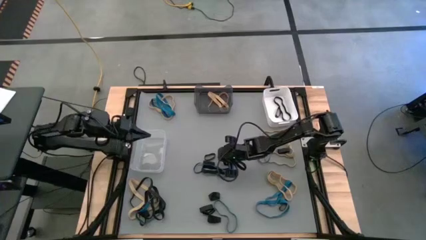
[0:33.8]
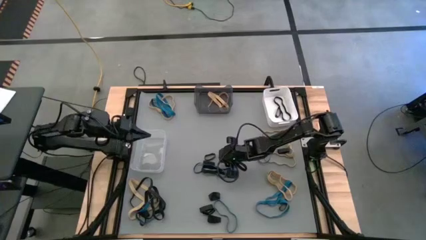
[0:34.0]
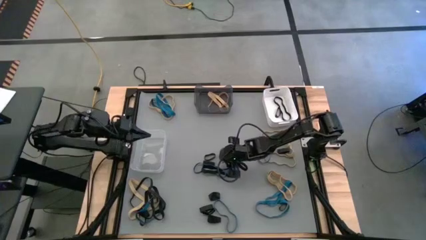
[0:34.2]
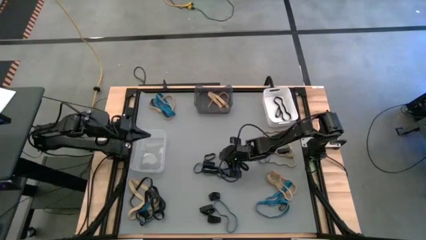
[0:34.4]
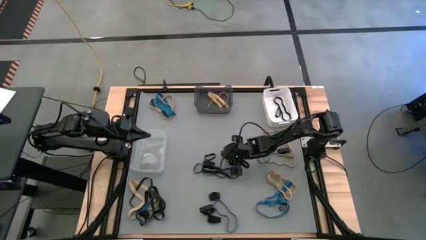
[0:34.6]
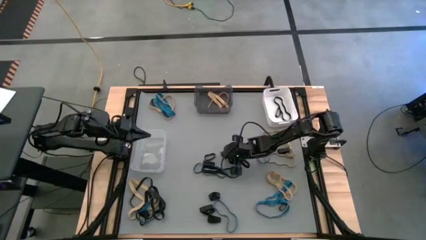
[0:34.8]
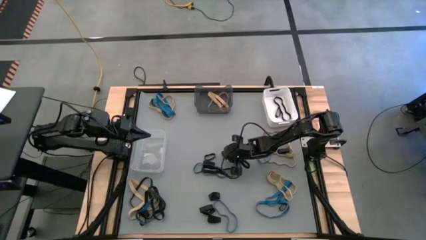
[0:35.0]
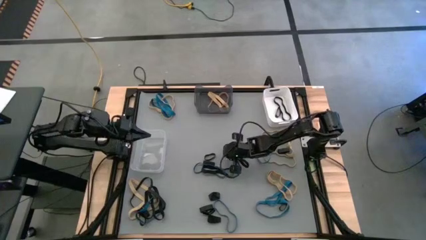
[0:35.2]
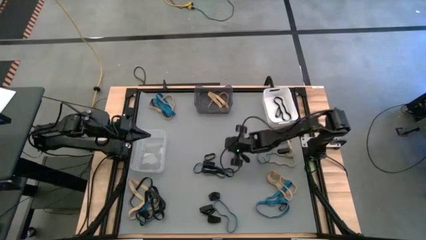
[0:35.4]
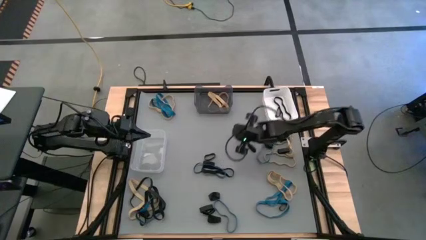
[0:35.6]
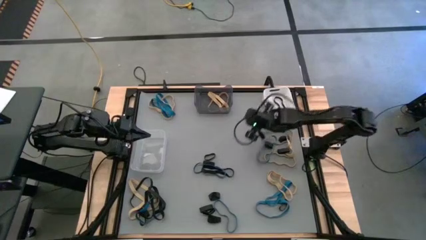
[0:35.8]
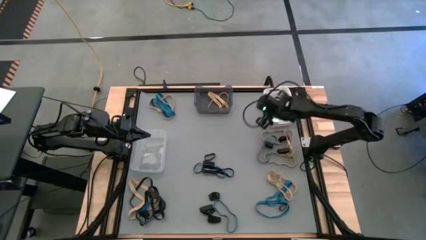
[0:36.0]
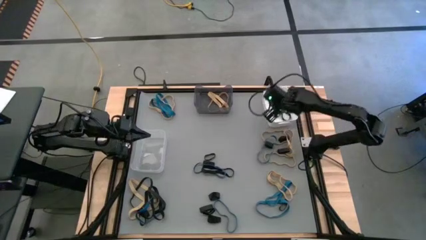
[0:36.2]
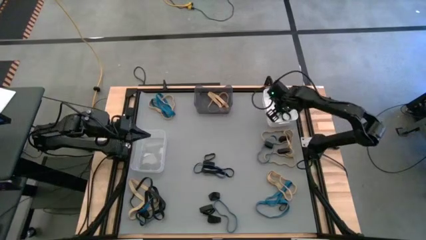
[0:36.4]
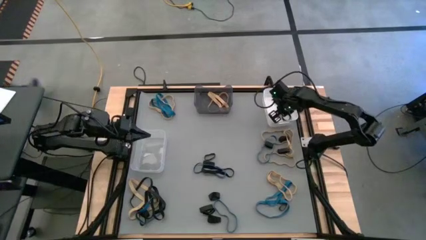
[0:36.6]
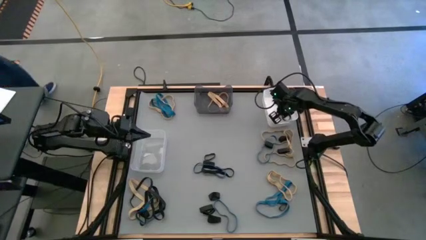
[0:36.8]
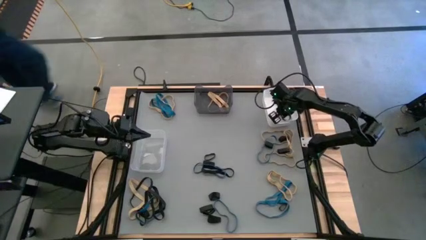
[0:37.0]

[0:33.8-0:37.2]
Task: Sort rubber bands into baskets
Put the black rubber band into the white bin

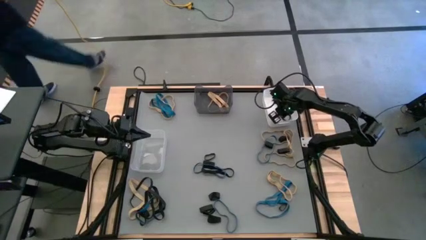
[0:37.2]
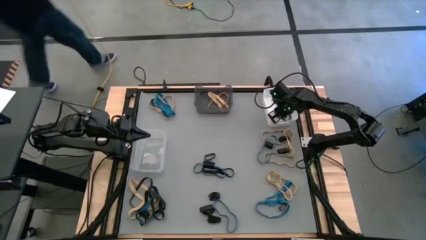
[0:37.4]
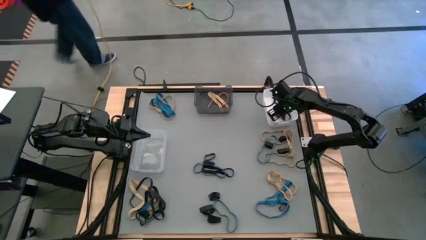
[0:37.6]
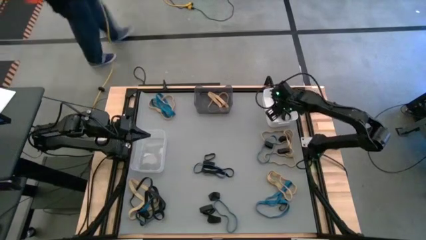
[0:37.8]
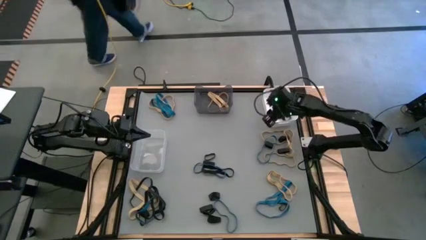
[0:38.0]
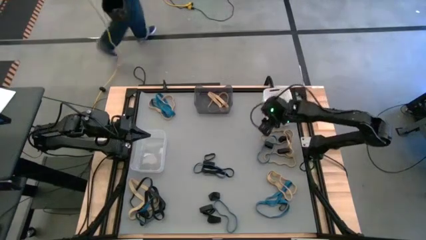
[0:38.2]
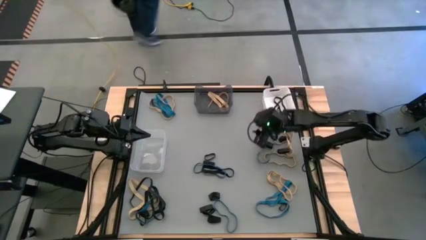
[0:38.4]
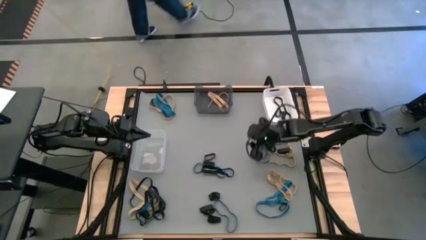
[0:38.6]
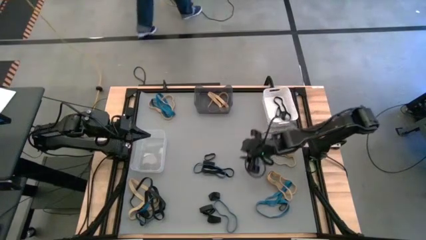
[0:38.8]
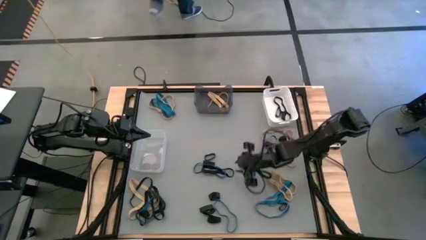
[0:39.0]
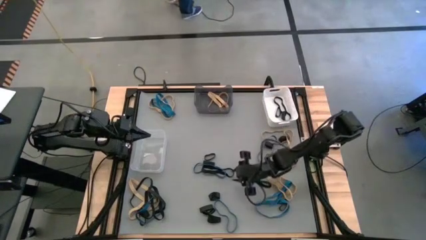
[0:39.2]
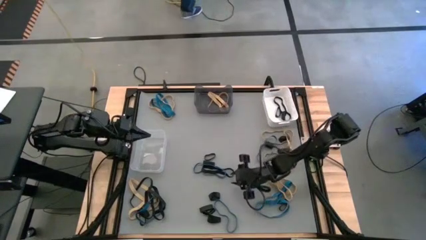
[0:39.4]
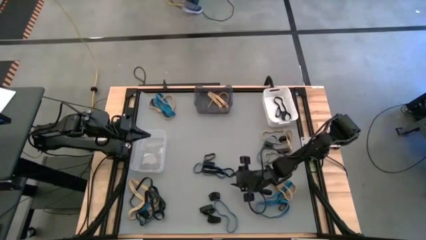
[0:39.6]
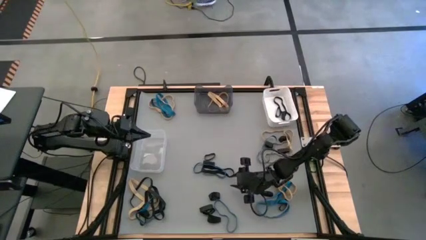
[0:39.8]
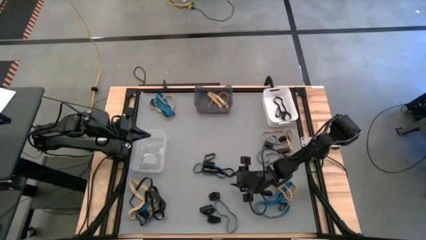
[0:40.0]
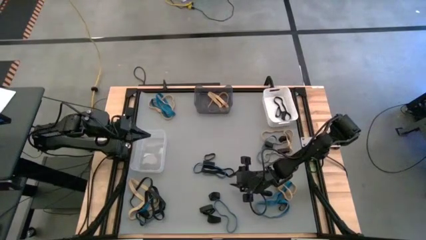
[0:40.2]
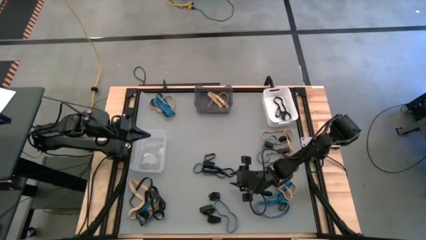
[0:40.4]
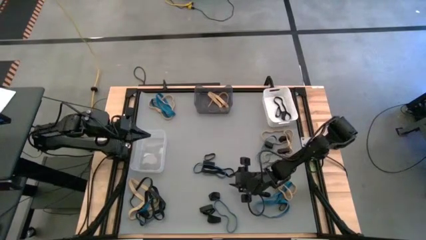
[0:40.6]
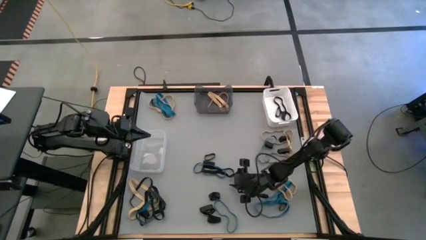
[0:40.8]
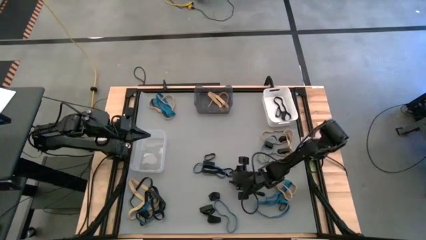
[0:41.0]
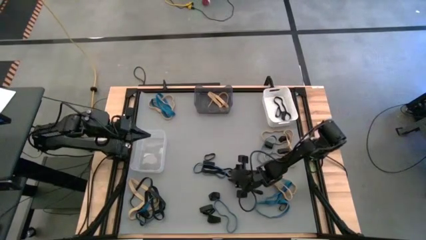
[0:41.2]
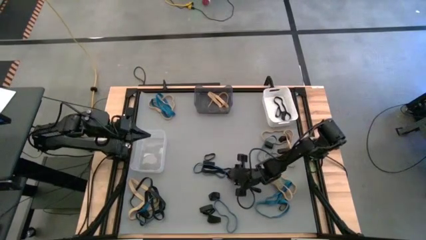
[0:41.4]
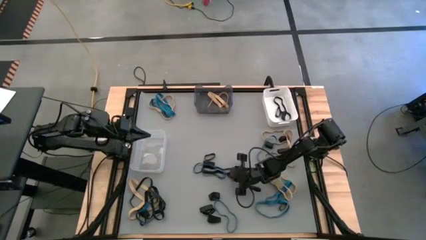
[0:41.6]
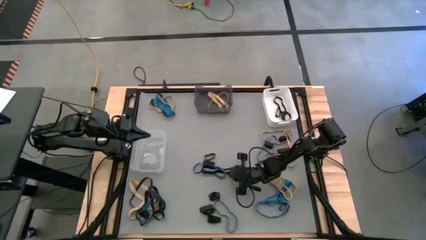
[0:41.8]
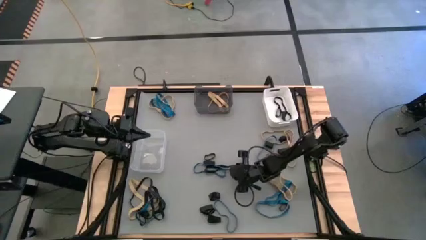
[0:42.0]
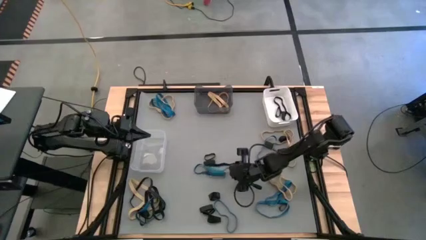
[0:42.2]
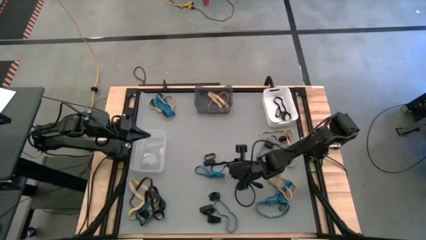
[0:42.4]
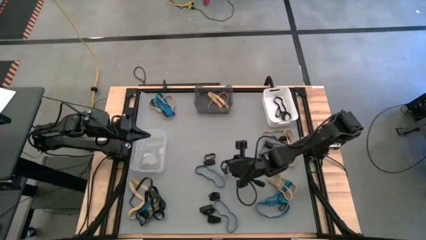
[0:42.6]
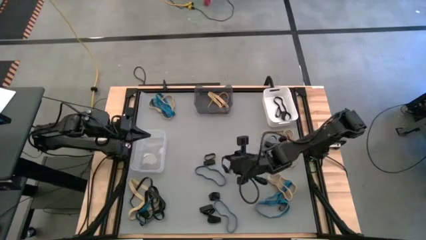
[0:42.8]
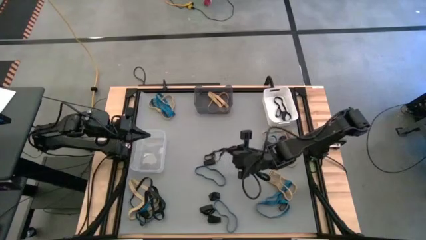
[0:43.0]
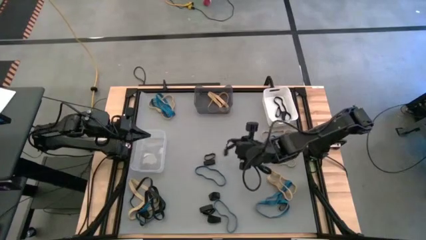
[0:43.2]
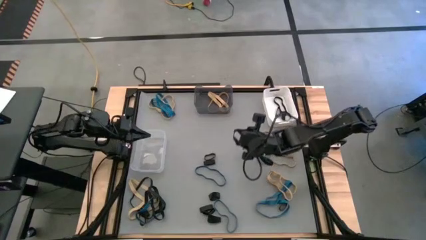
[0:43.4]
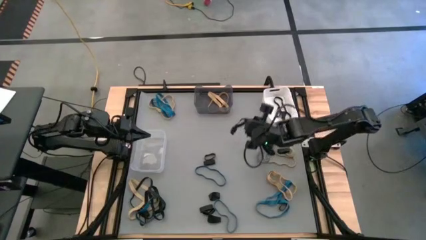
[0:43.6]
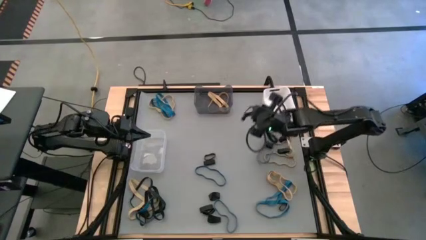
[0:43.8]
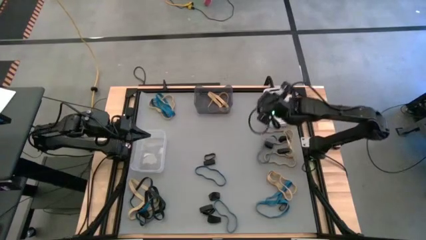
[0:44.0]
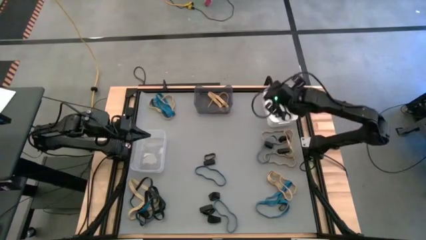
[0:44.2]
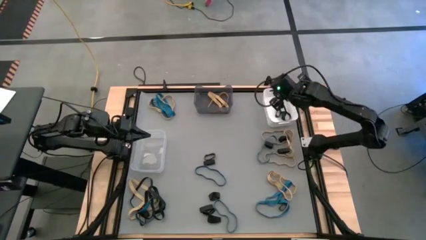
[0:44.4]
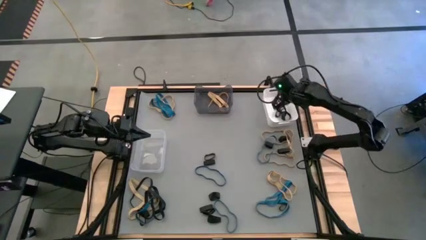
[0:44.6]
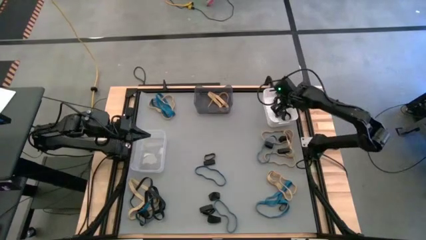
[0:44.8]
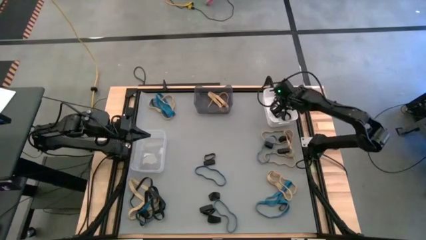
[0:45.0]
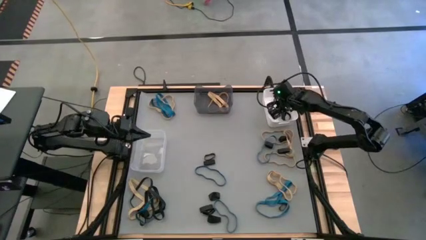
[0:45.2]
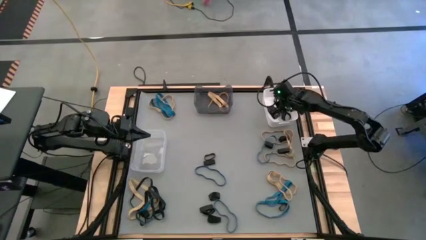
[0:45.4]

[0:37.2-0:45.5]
Put the black rubber band into the white bin

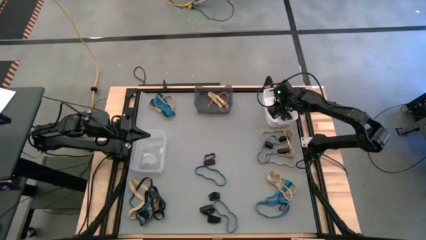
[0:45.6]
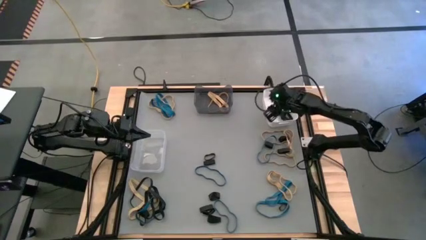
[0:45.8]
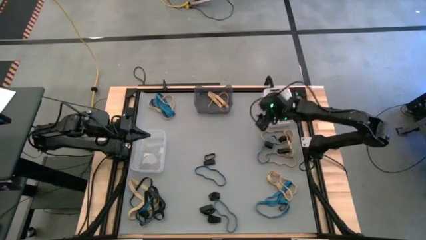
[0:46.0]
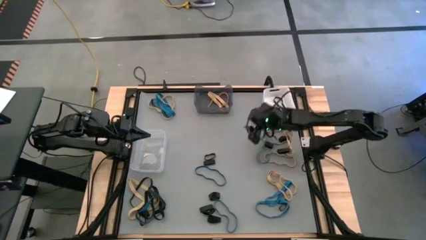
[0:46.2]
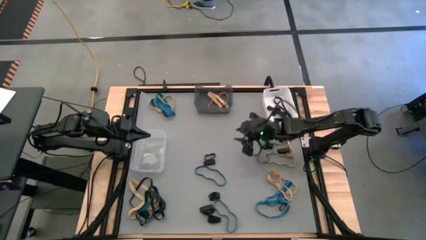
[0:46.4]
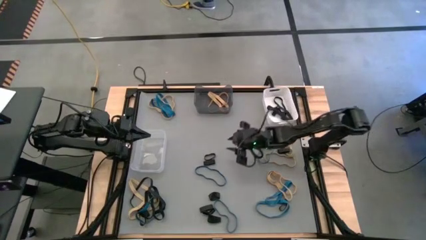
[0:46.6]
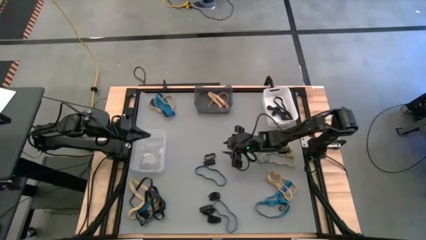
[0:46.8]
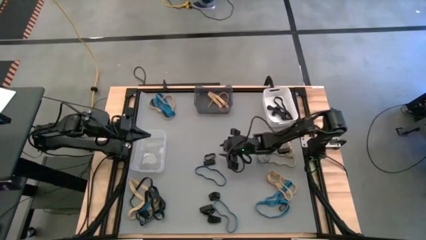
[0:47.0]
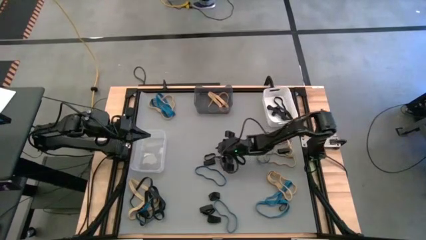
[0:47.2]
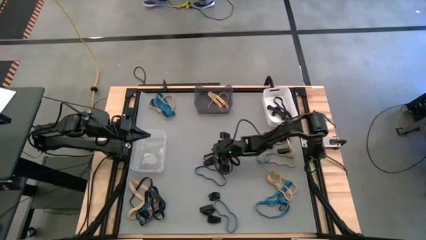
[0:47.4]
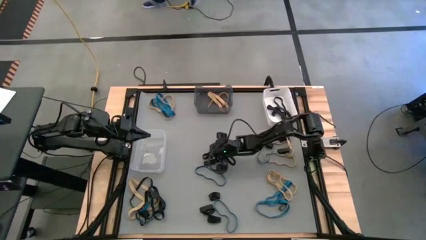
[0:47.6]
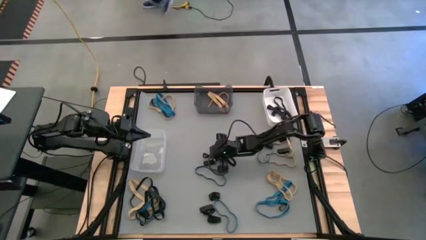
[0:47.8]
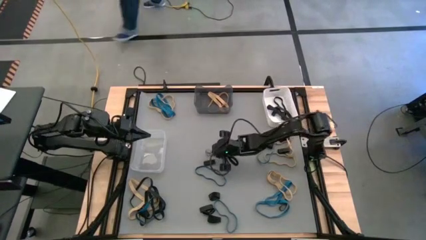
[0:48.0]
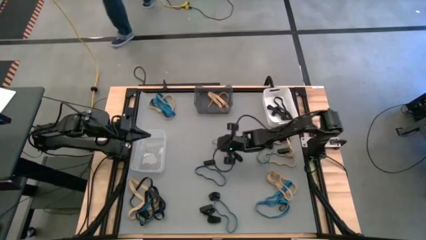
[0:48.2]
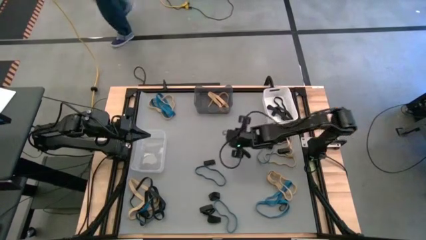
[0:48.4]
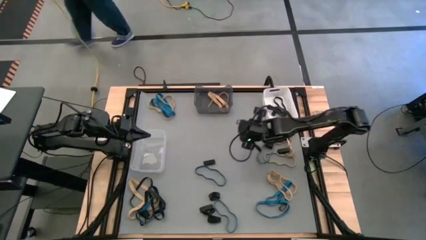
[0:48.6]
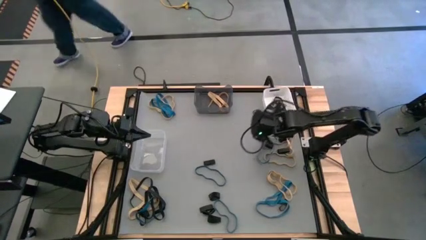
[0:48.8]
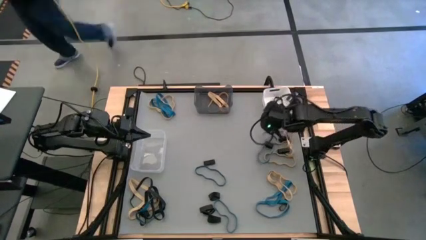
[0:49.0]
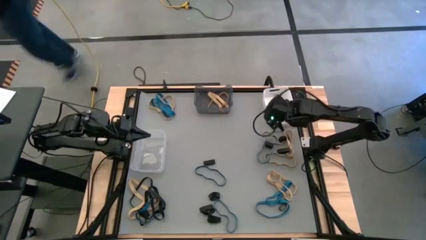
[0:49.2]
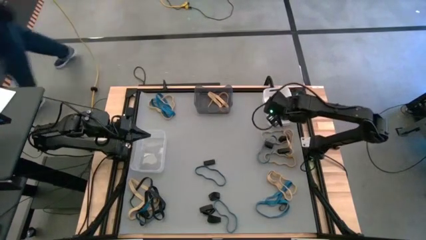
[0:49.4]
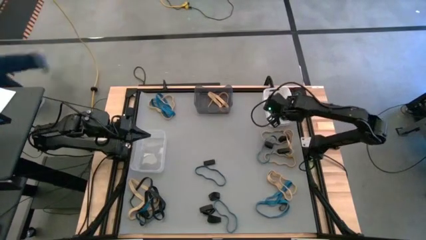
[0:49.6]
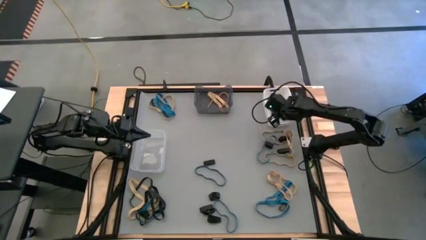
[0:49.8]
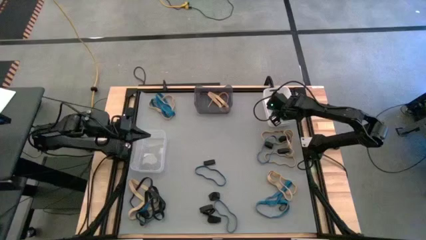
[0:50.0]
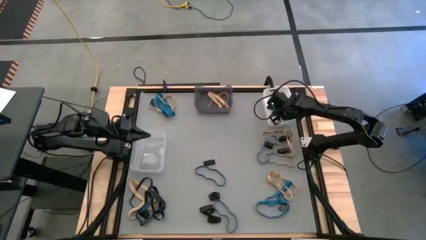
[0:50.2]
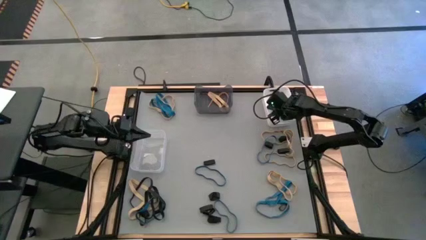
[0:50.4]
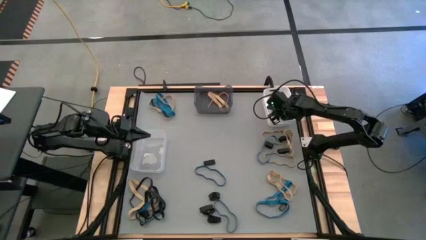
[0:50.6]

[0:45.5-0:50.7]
Put the black rubber band into the white bin
